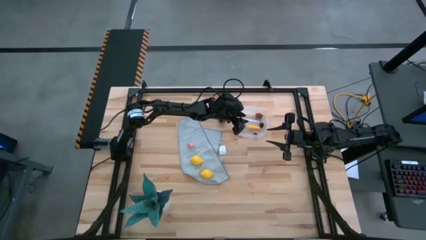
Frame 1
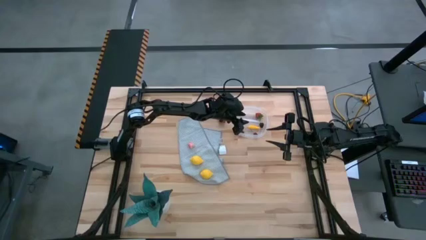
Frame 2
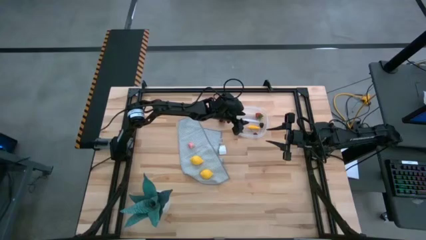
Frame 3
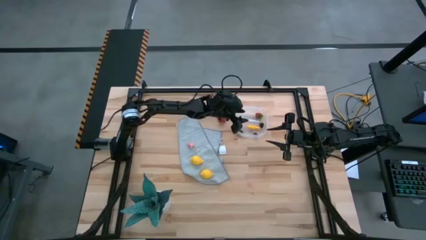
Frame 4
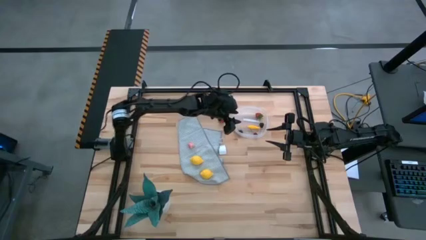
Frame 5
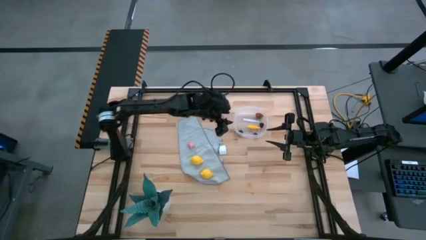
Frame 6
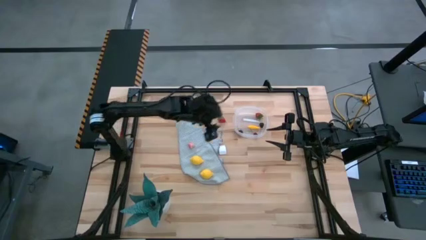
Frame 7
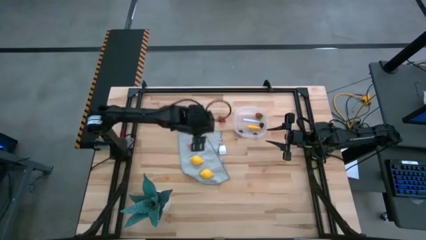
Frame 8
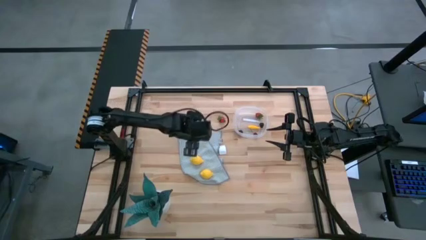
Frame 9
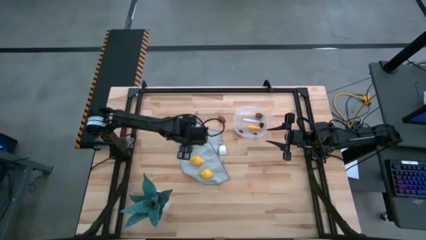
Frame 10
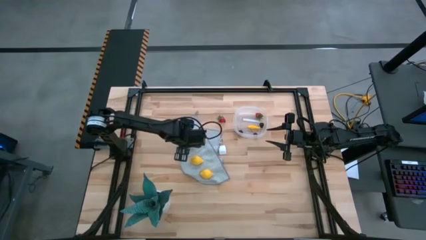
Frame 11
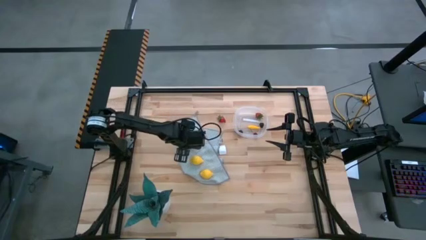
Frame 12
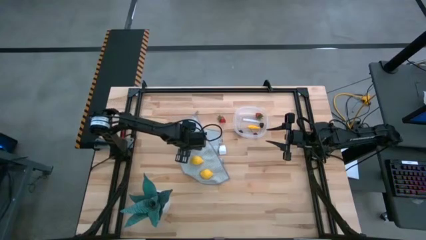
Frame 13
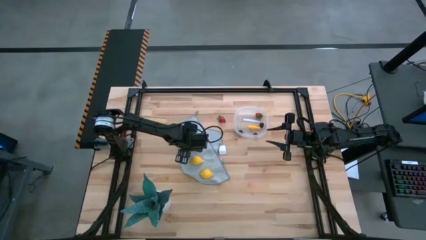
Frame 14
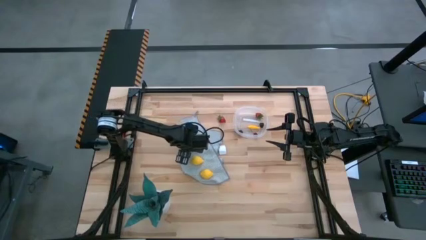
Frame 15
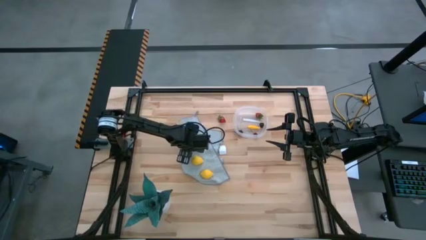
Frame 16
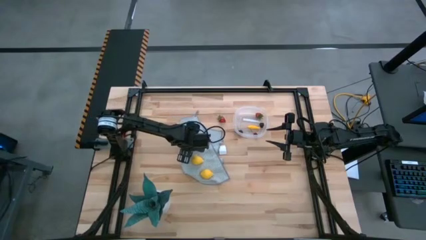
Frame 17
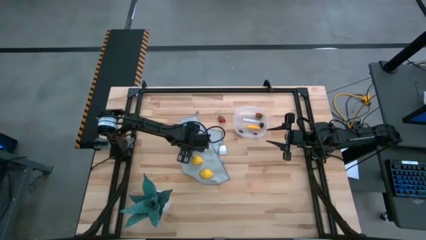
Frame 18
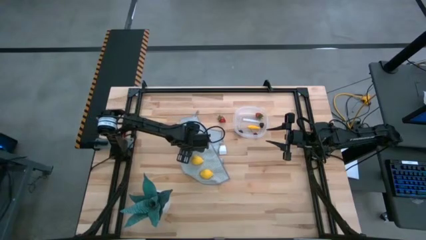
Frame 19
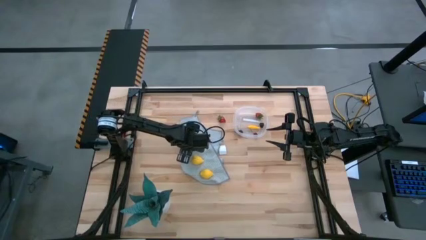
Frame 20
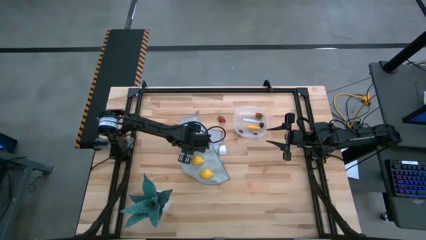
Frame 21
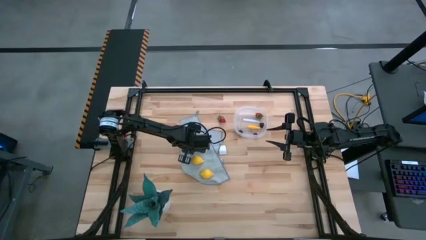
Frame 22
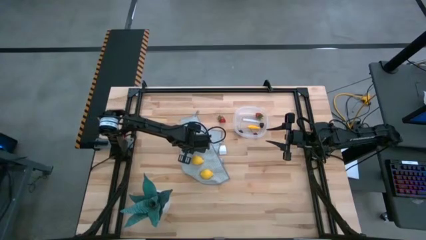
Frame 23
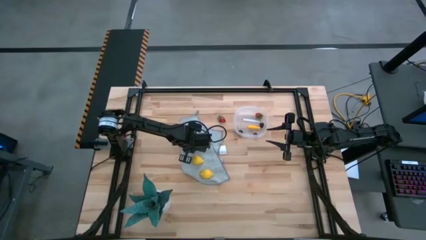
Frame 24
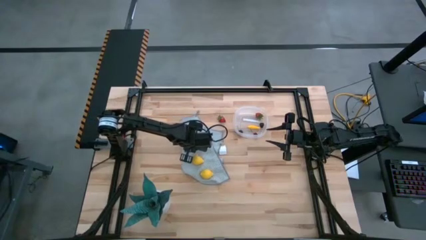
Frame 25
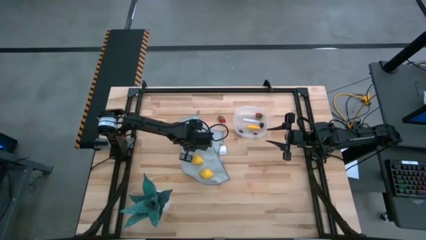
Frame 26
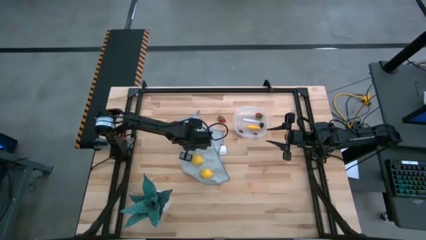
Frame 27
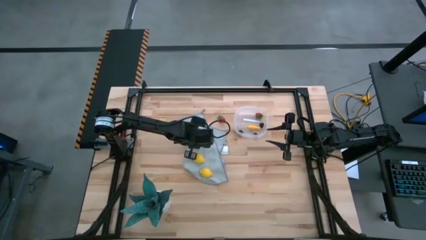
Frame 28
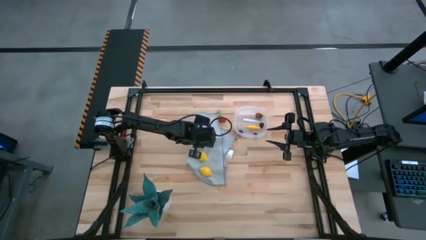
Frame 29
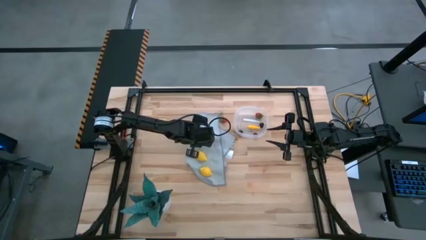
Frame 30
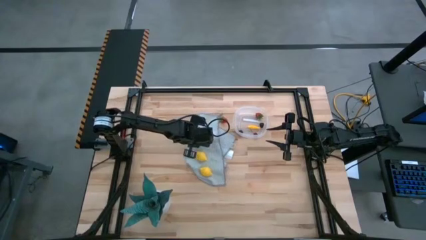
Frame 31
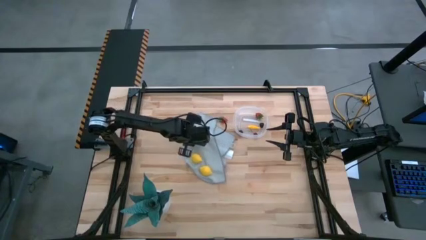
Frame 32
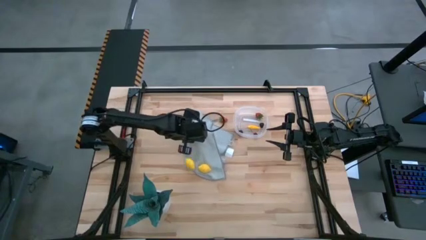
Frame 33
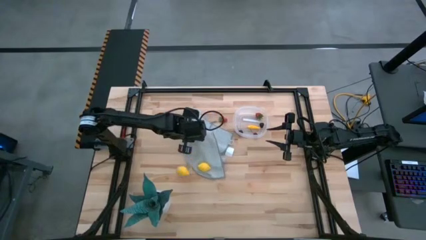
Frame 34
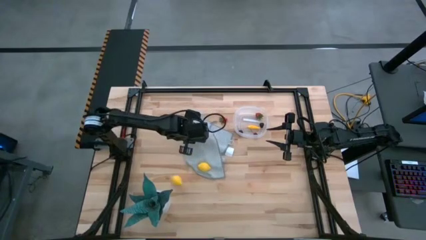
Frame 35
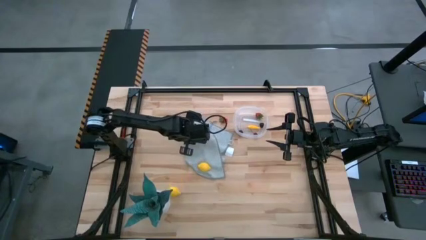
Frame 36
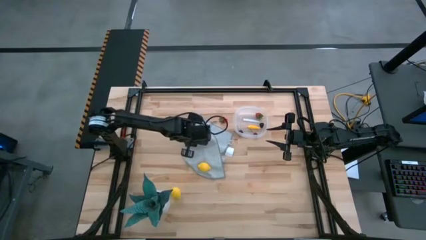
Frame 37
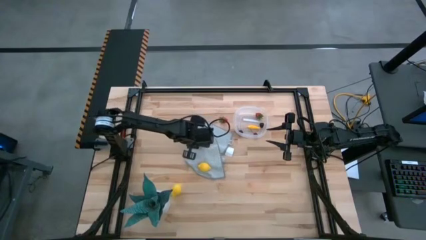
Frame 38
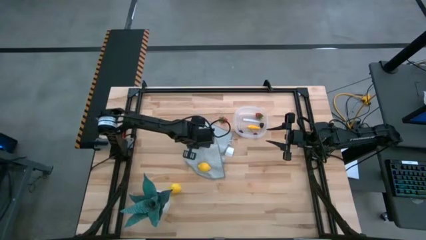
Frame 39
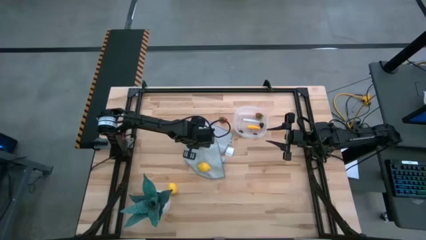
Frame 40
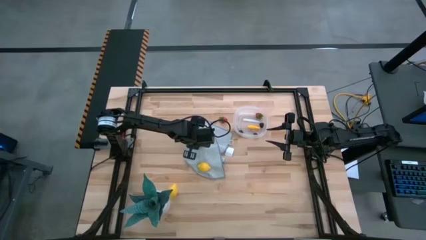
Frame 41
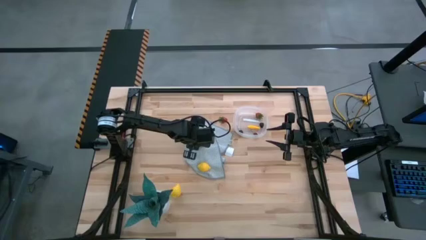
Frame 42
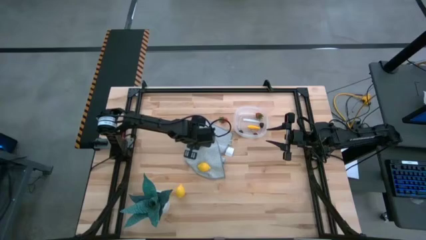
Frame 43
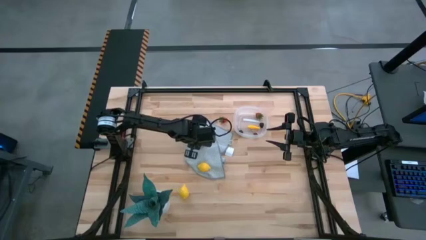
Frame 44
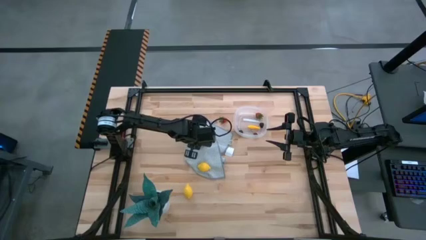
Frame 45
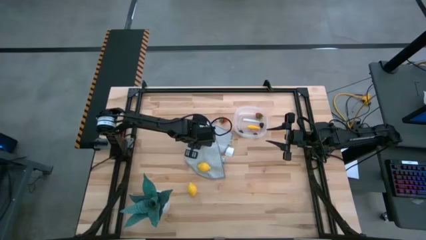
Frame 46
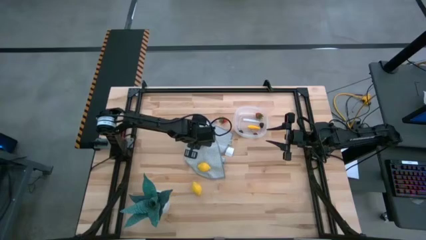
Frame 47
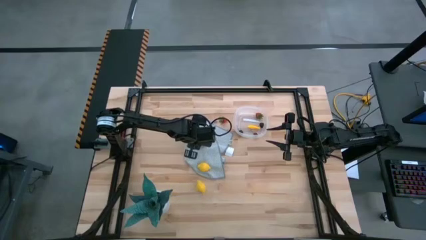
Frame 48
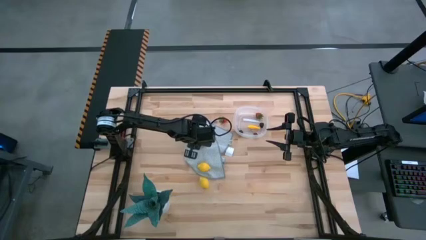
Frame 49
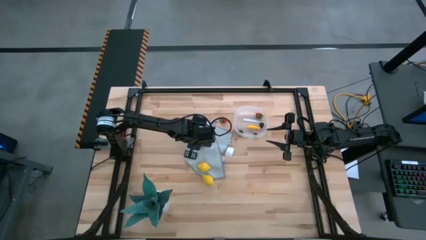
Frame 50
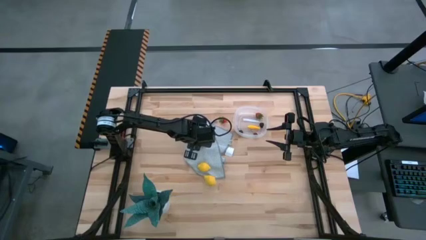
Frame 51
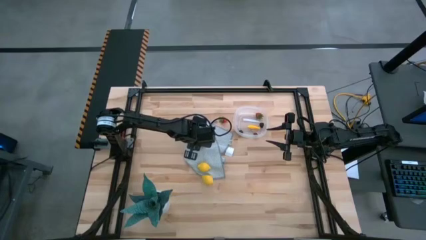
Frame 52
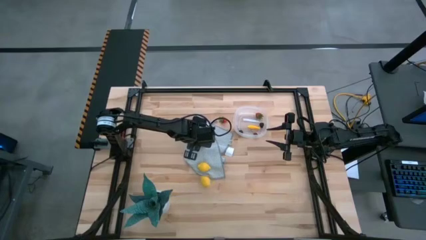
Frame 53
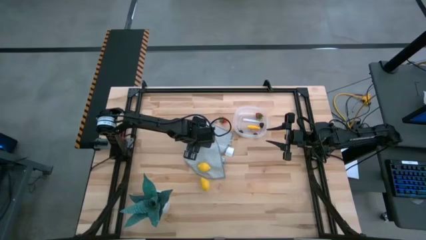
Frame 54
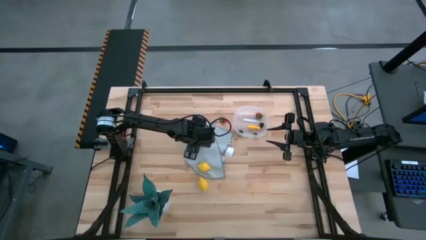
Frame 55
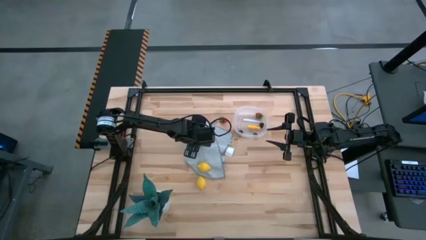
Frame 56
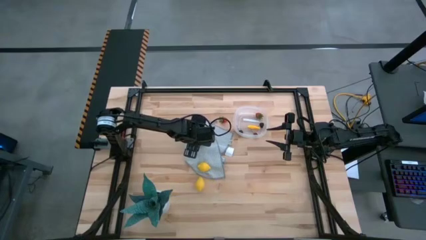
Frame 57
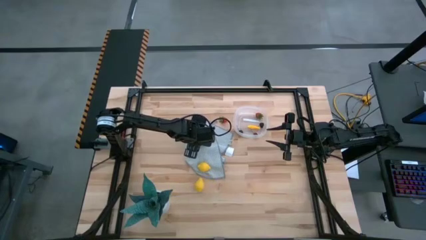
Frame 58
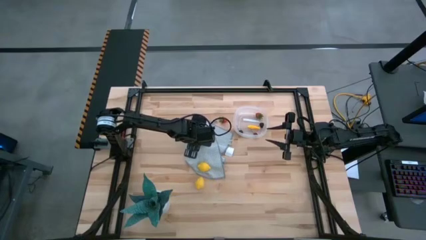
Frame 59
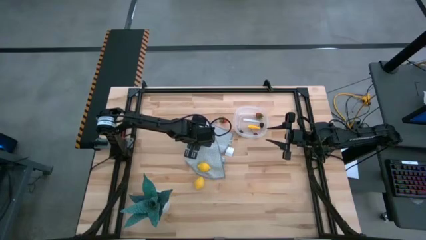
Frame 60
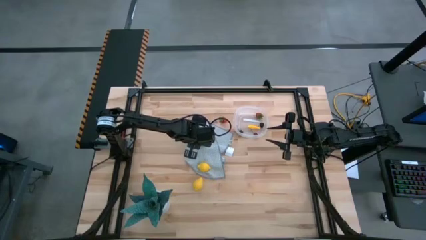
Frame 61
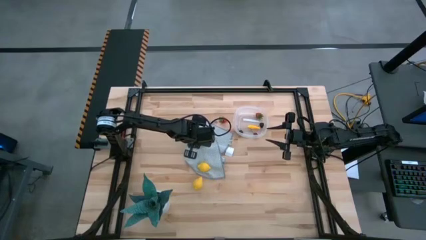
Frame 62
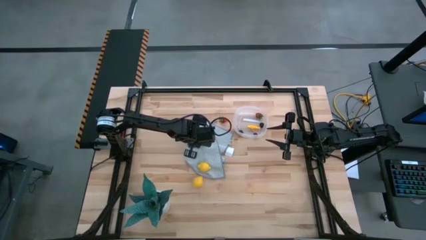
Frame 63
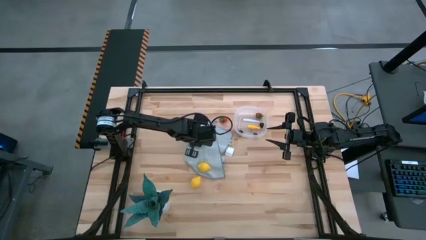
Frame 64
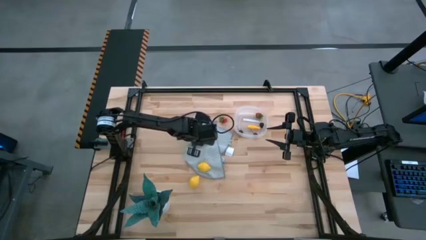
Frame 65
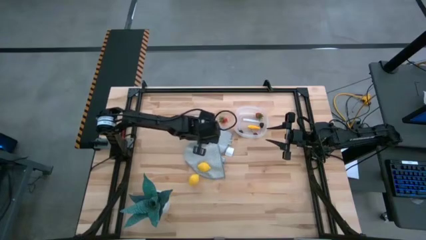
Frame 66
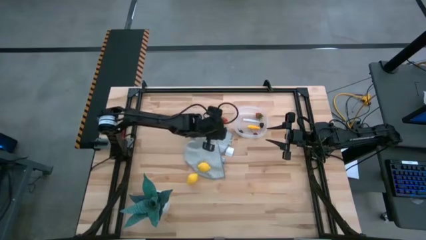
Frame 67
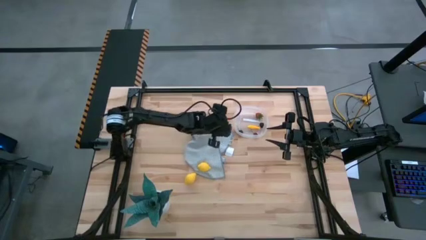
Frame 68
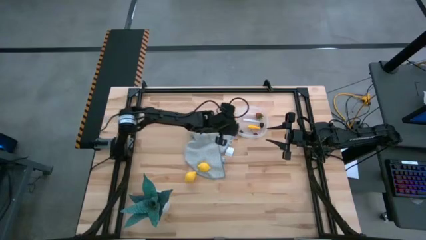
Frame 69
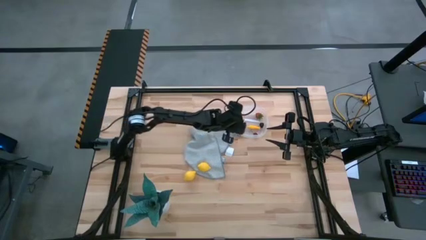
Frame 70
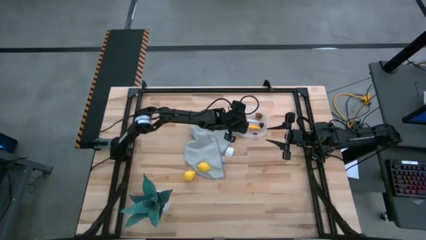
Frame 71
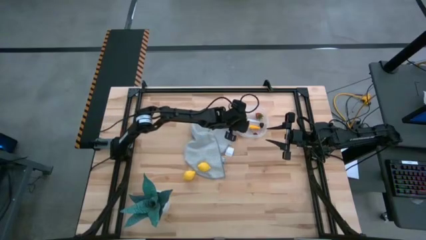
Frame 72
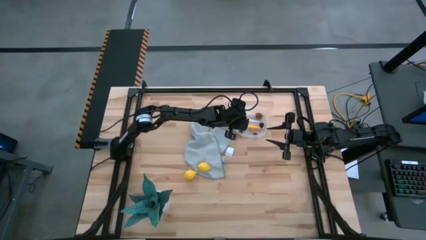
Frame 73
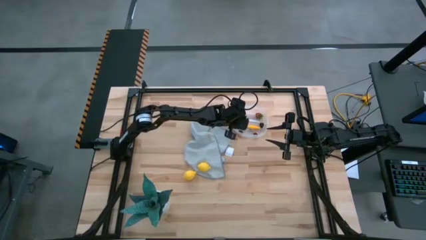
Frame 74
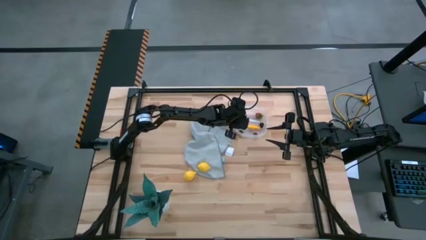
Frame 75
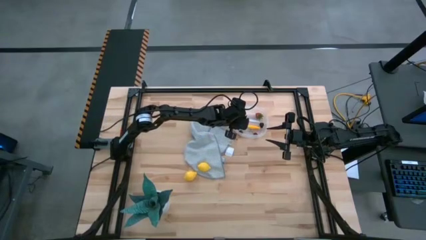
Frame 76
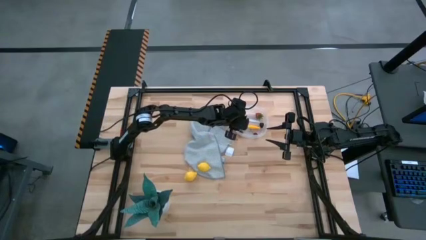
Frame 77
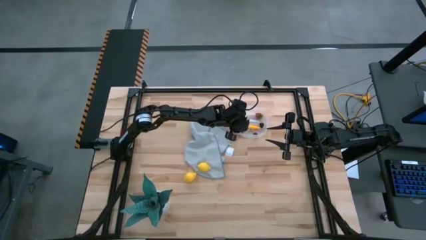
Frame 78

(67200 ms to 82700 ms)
Task: Pick and placing Produce into tupperware
Put the pink peach into the transparent bin
